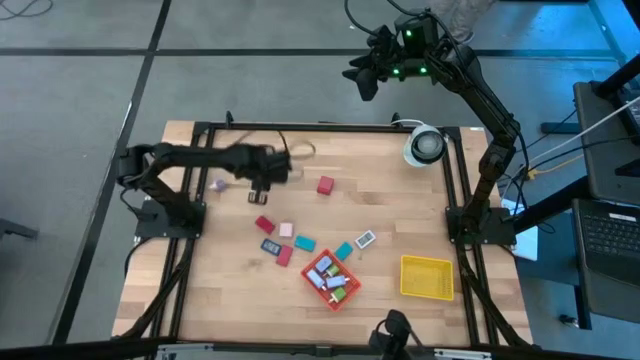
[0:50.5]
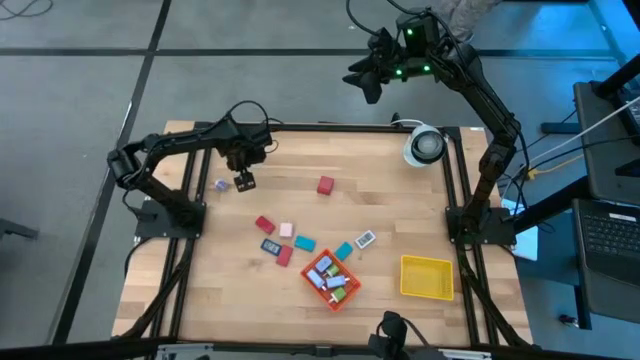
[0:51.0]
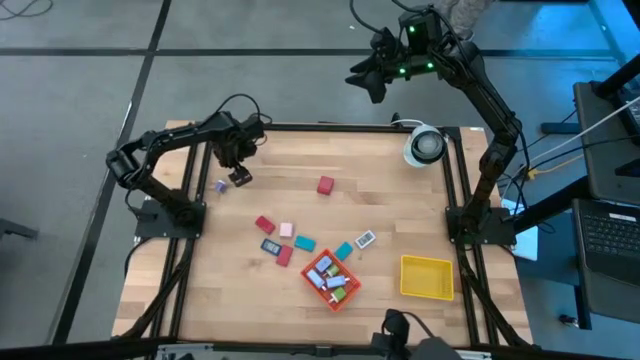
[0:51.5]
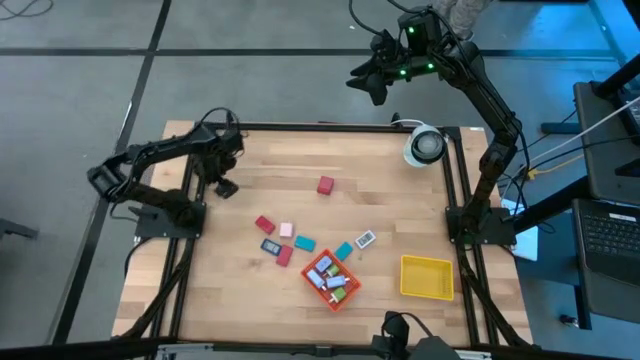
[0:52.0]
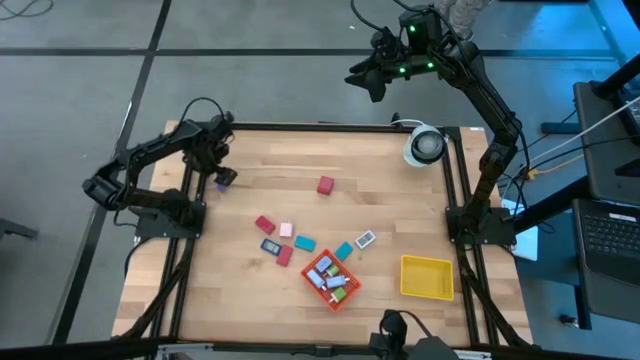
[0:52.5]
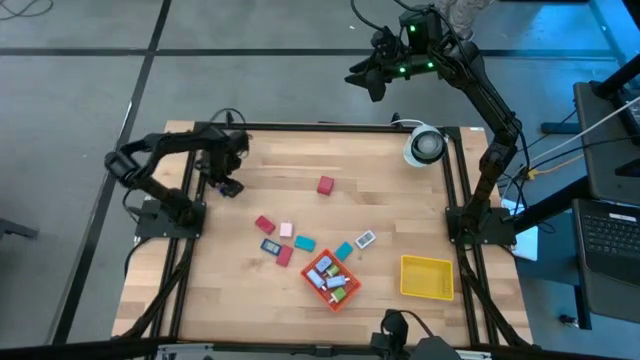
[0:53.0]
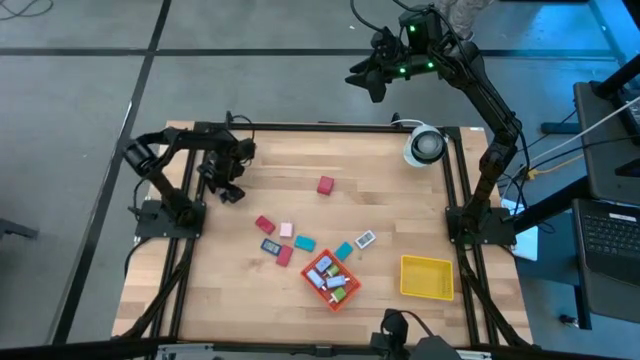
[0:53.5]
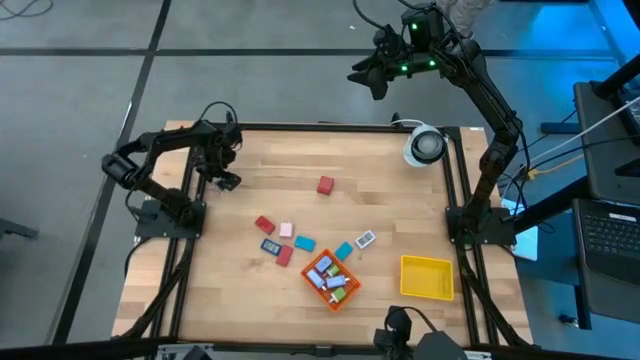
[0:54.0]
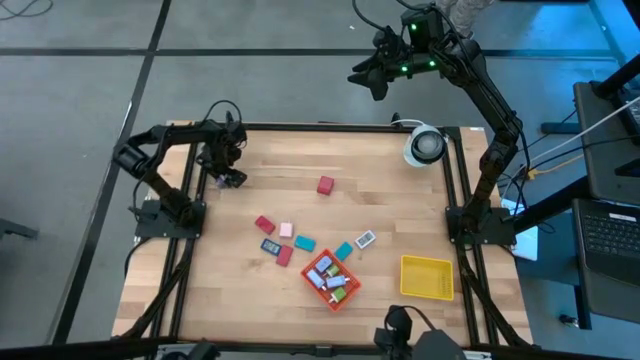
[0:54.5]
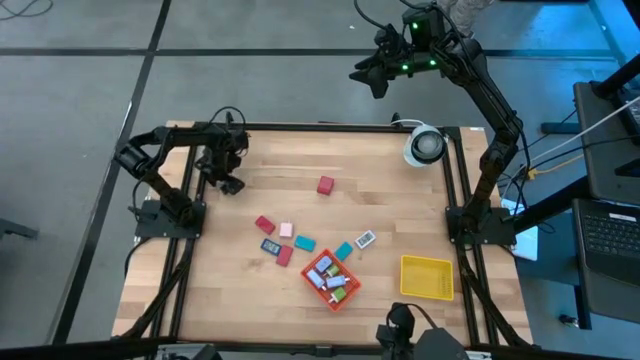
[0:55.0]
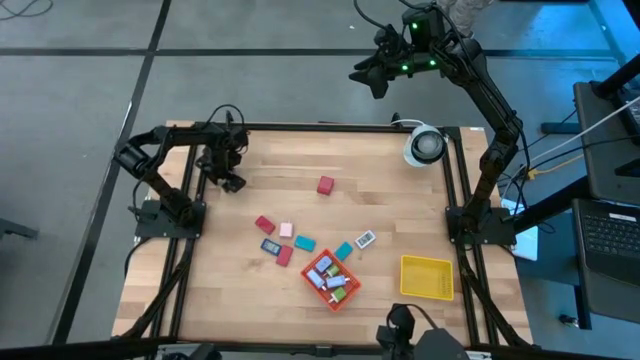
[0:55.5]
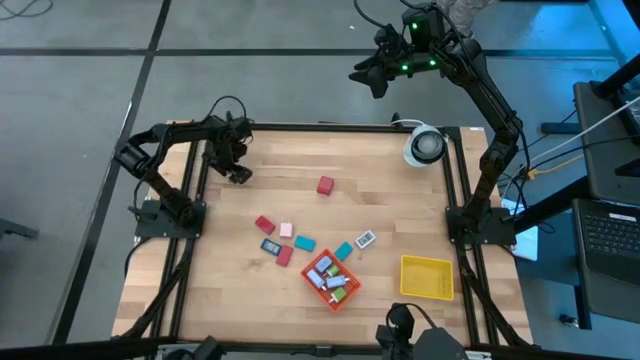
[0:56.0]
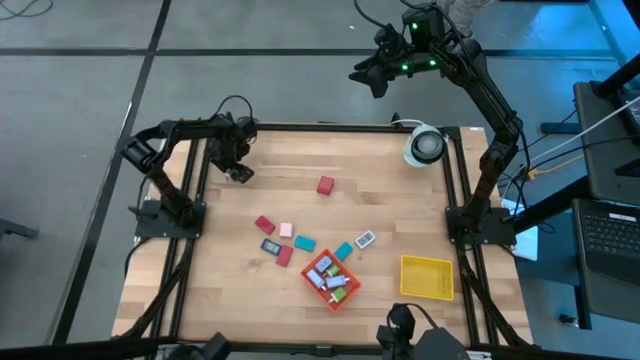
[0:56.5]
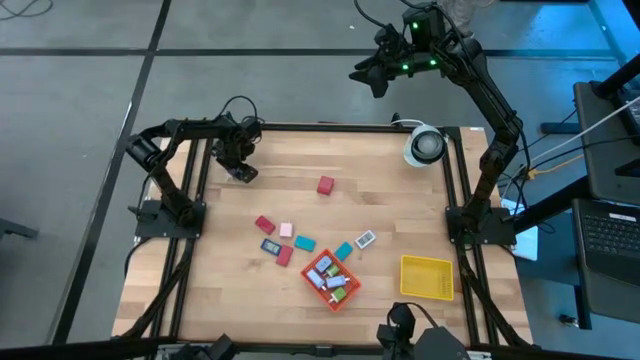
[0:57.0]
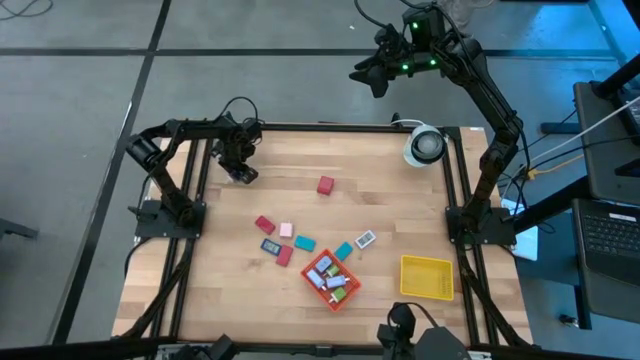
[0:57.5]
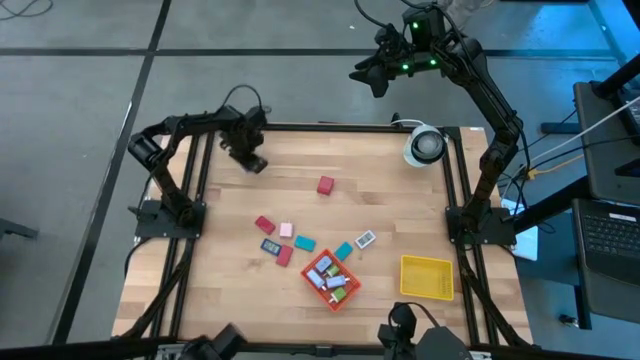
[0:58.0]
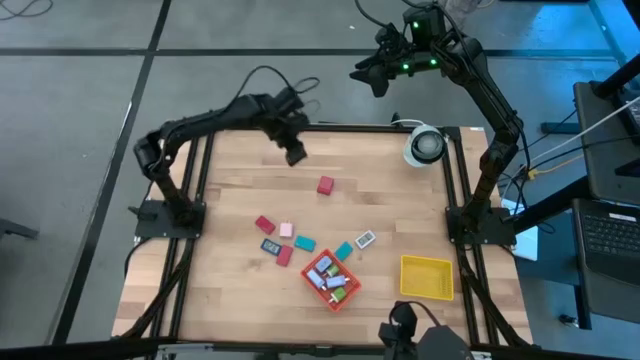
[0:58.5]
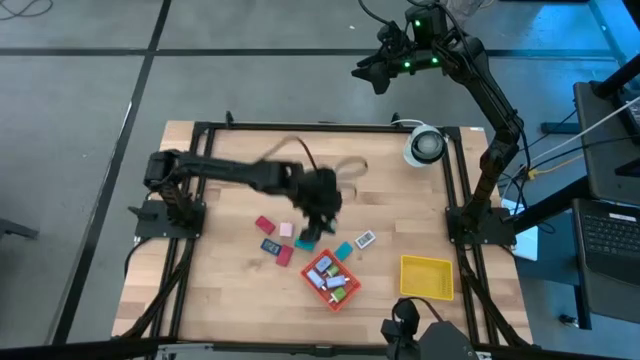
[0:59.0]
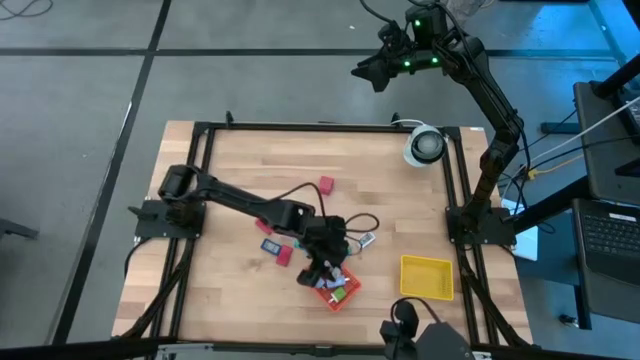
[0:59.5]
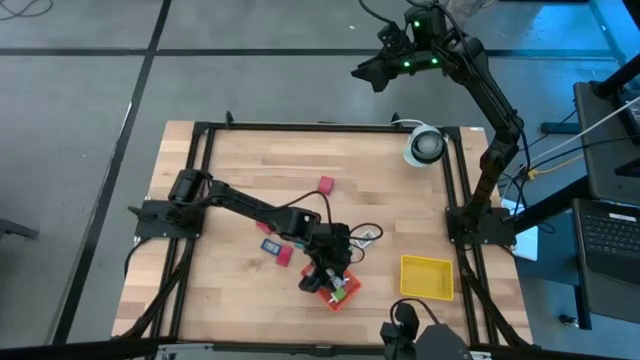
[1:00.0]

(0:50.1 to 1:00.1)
Task: Pick & Place Office items
Put the violet charger adapter into the orange bin

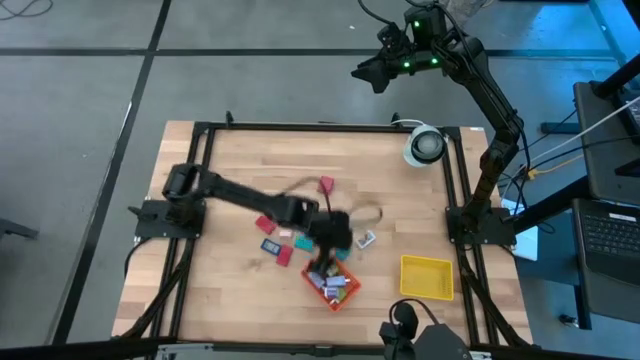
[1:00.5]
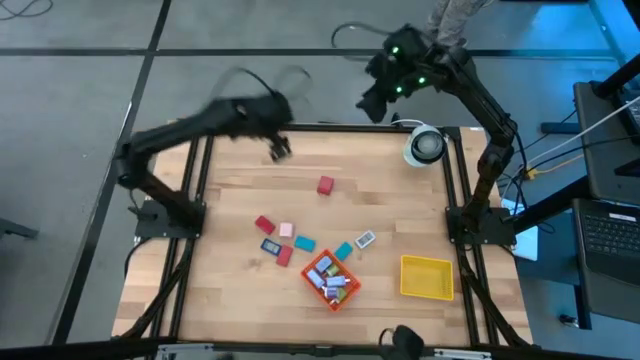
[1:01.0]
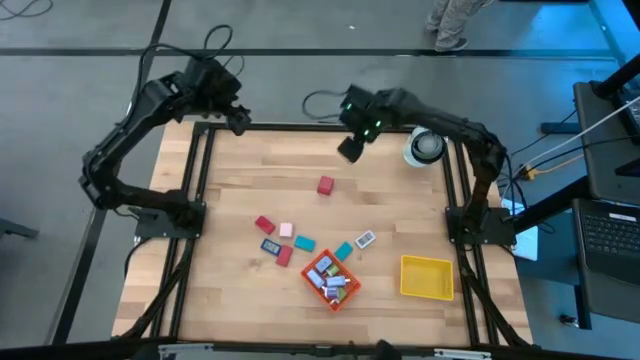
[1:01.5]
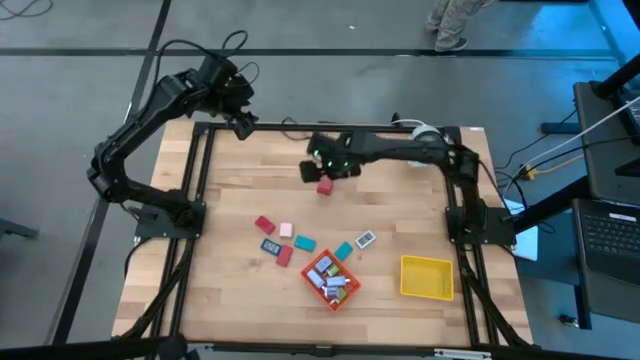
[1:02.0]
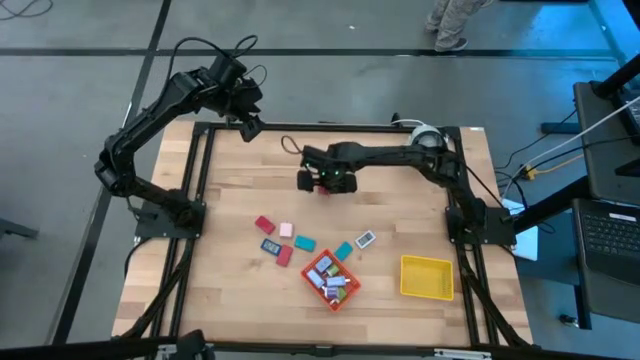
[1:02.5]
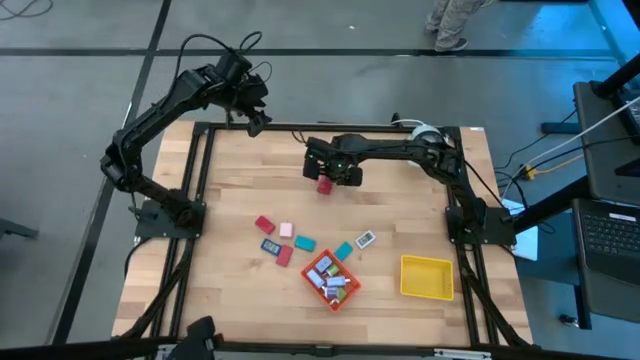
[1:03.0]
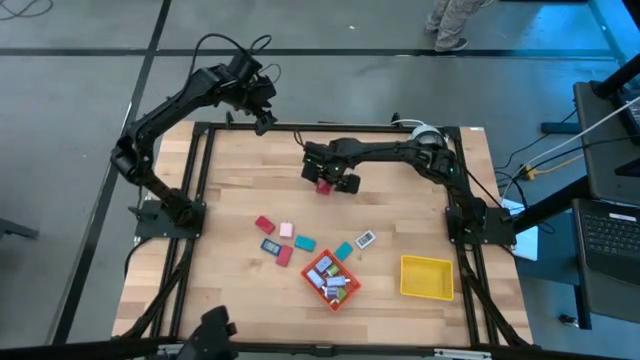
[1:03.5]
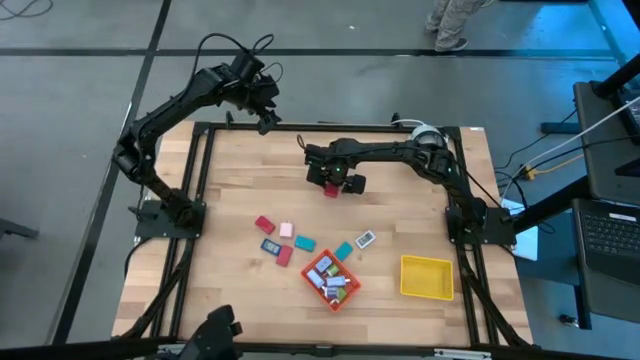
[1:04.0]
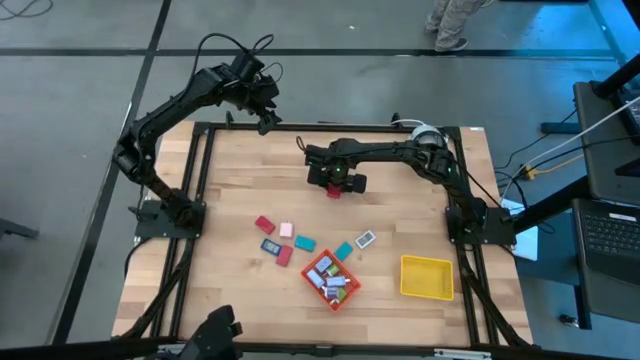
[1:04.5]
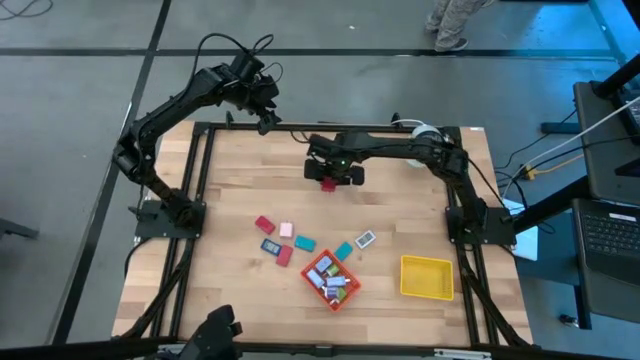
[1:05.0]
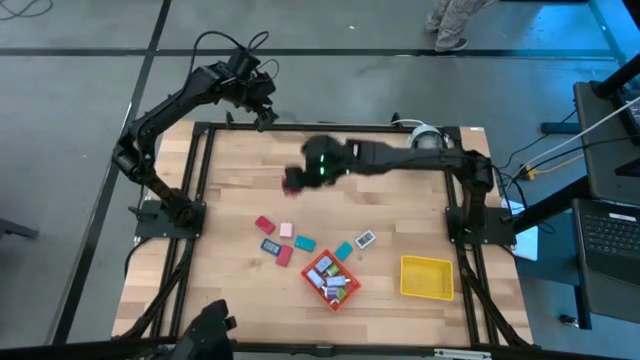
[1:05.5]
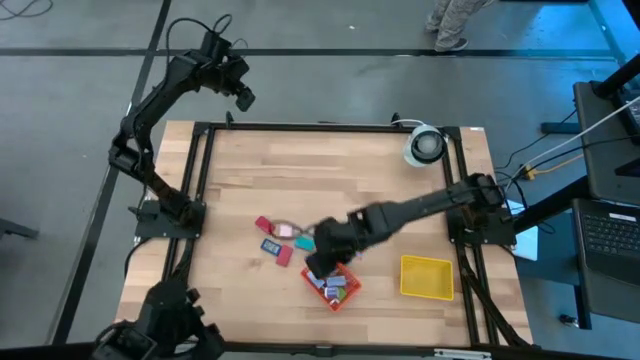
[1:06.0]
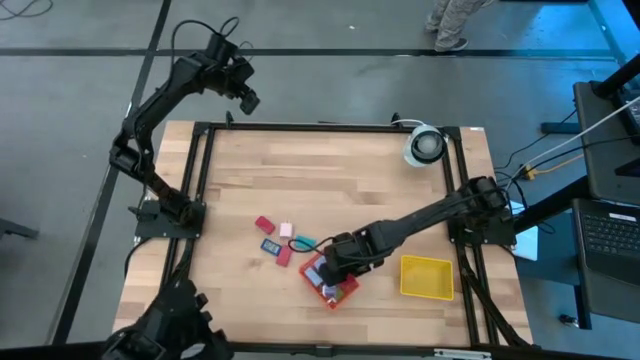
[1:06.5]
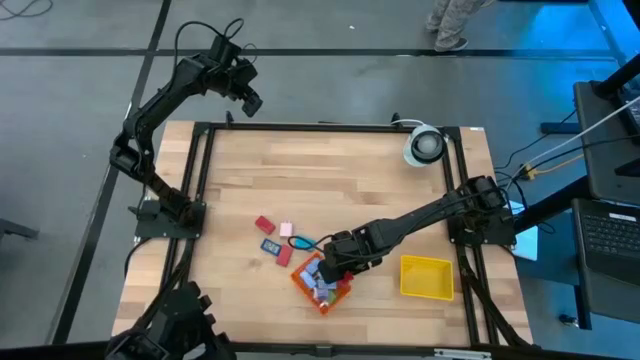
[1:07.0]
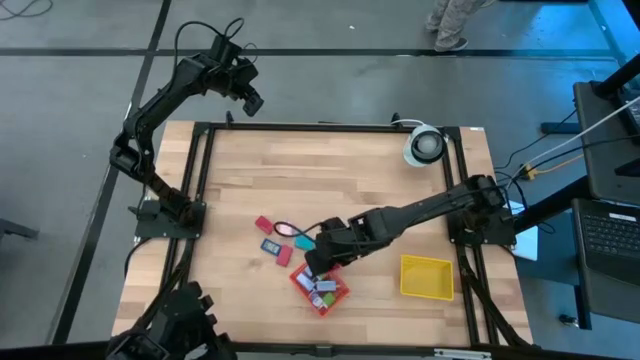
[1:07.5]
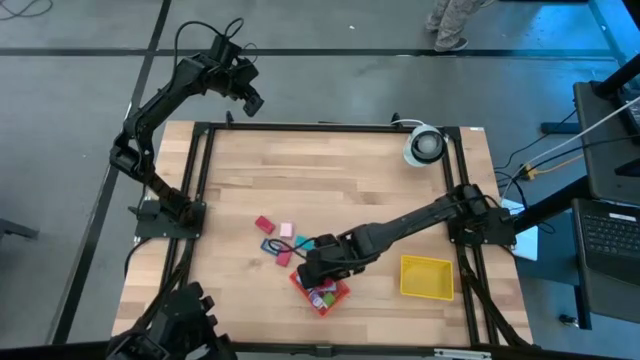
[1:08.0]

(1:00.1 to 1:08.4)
Put the red charger adapter into the orange bin

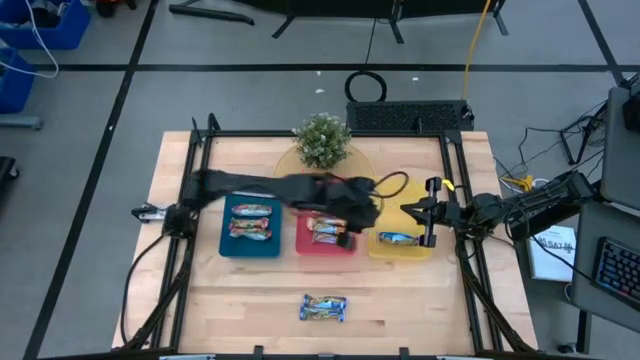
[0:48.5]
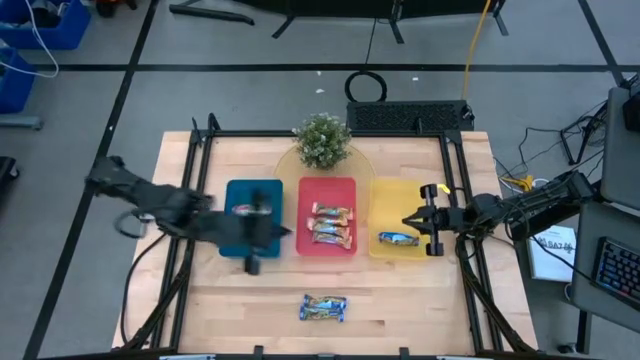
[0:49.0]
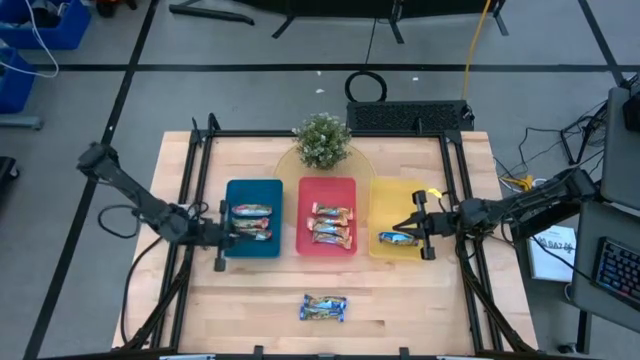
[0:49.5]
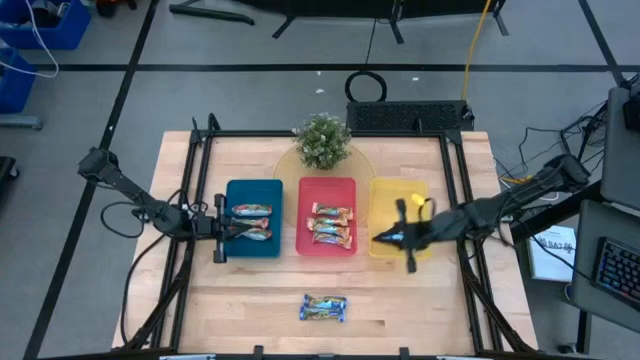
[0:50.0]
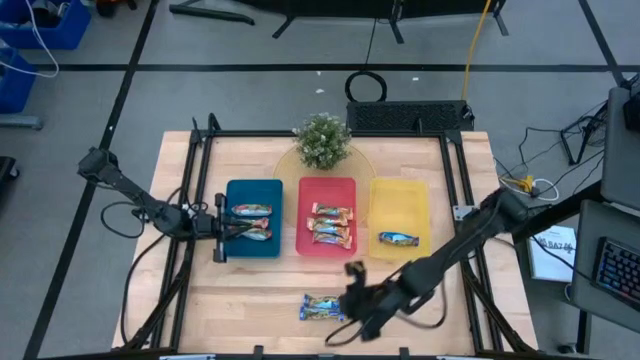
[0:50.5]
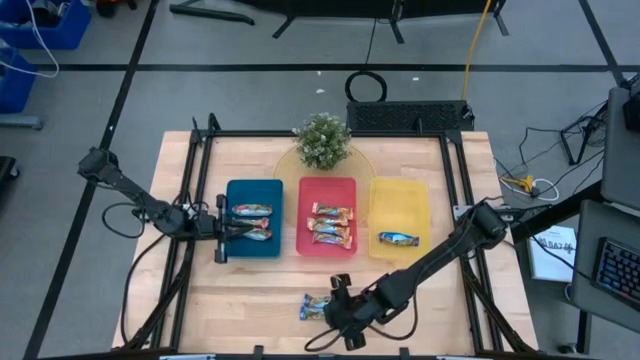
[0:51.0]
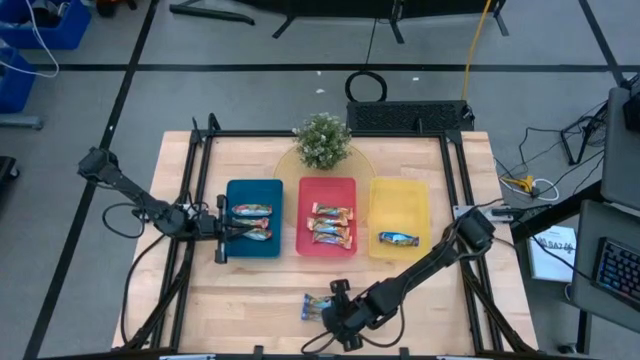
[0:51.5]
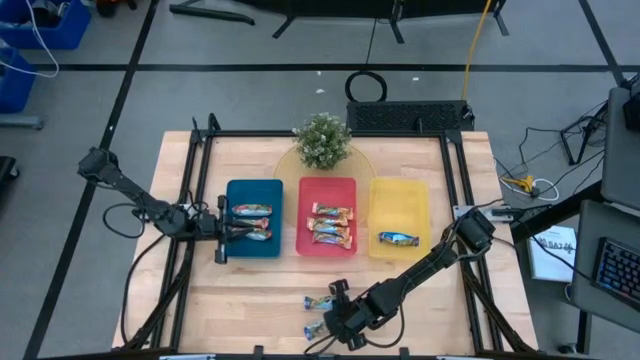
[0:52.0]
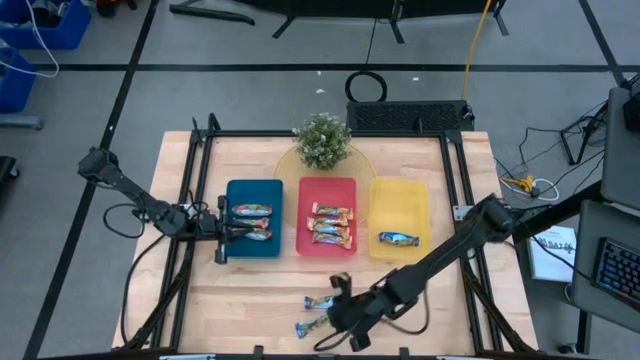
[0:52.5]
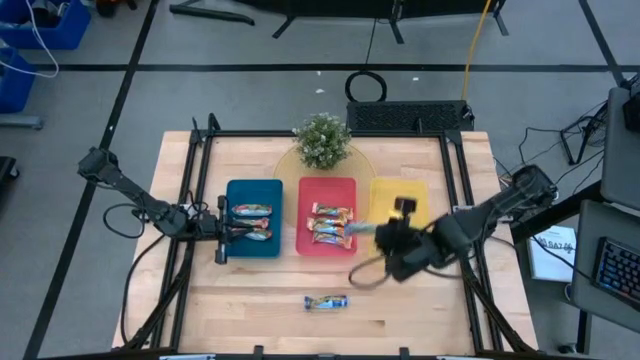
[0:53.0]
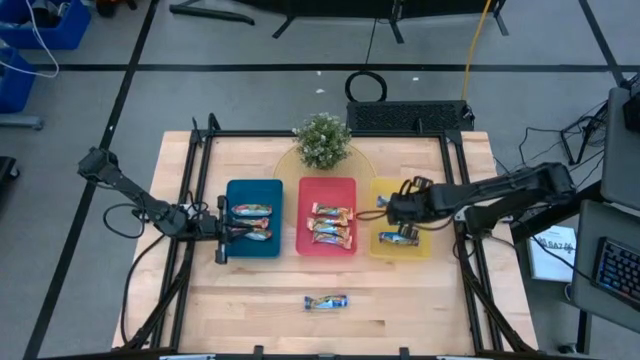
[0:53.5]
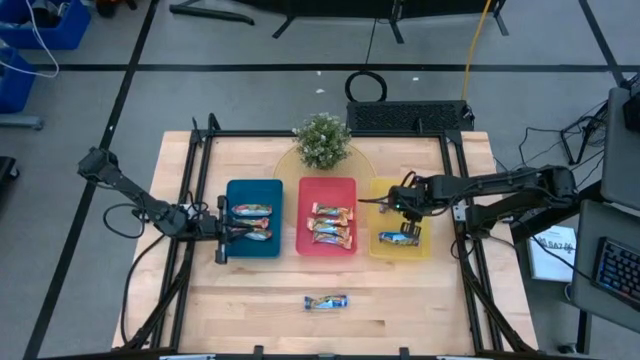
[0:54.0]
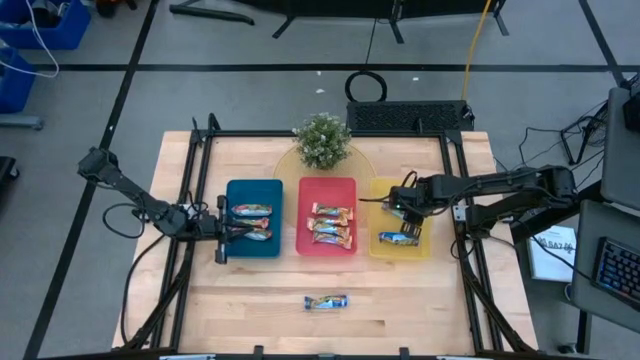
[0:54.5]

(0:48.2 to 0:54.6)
Task: Pick and place Granola Bars by type
Put the bottom blue granola bar into the yellow bin
